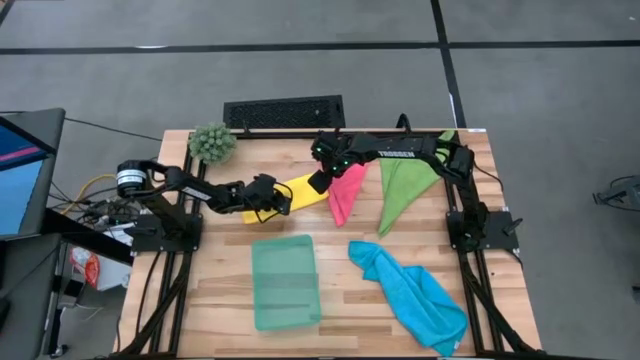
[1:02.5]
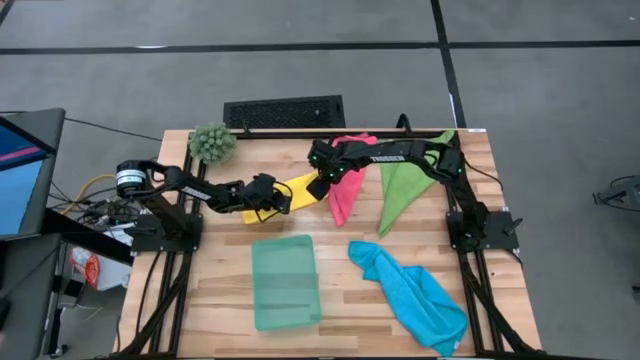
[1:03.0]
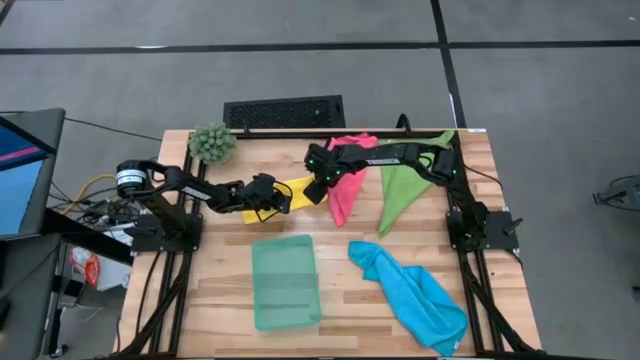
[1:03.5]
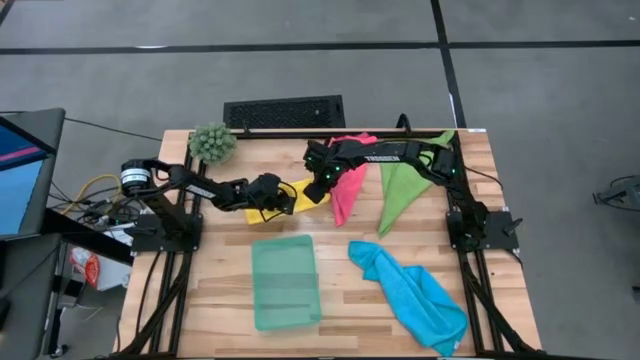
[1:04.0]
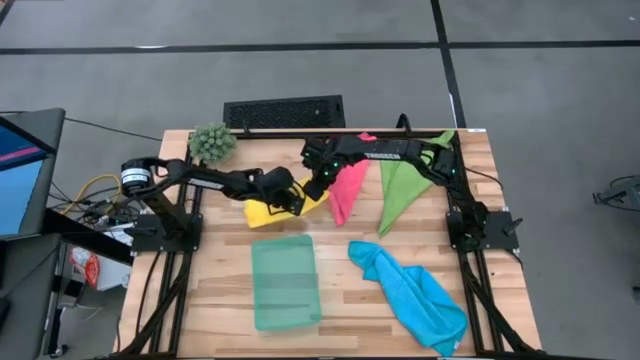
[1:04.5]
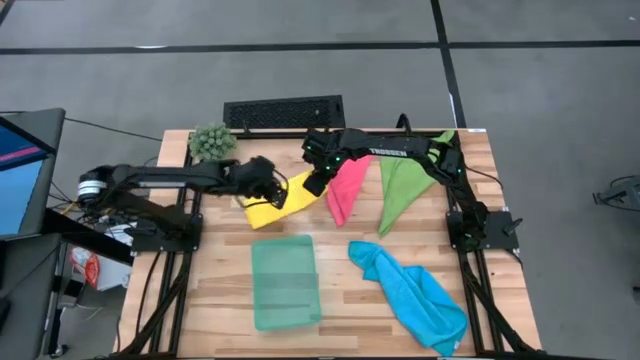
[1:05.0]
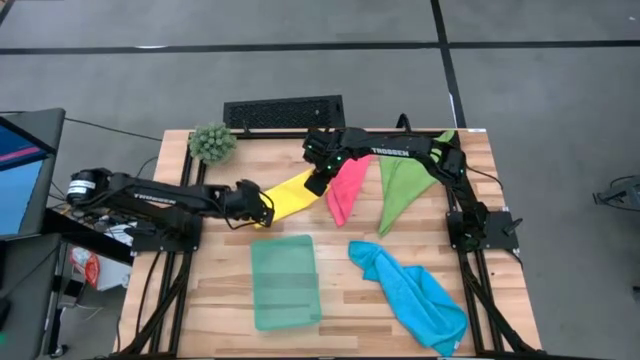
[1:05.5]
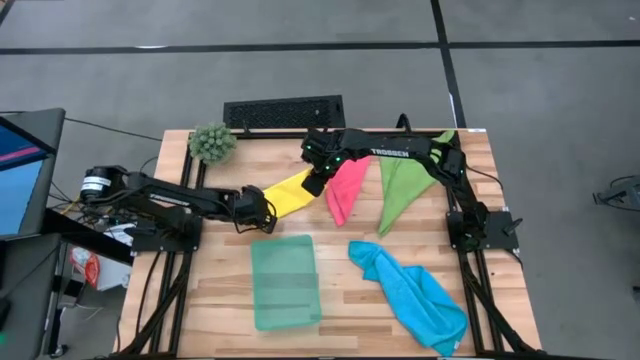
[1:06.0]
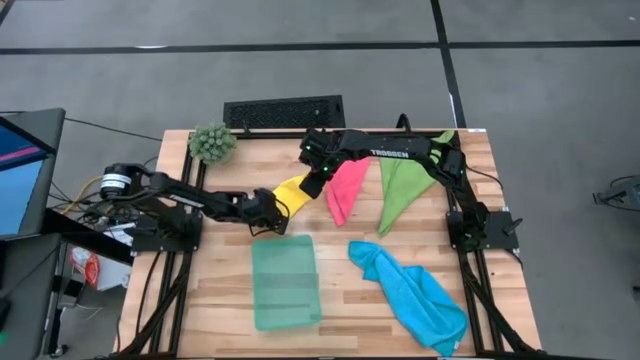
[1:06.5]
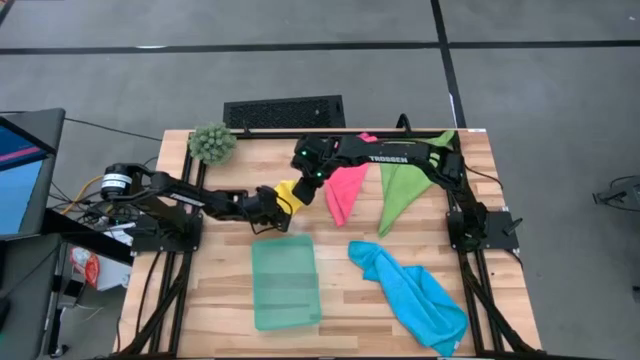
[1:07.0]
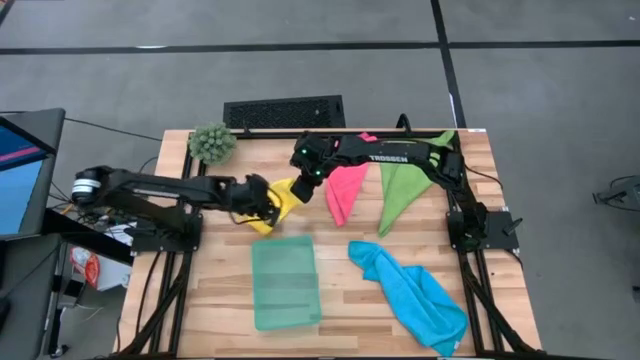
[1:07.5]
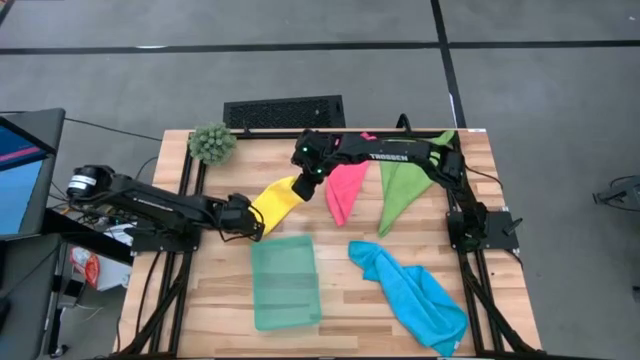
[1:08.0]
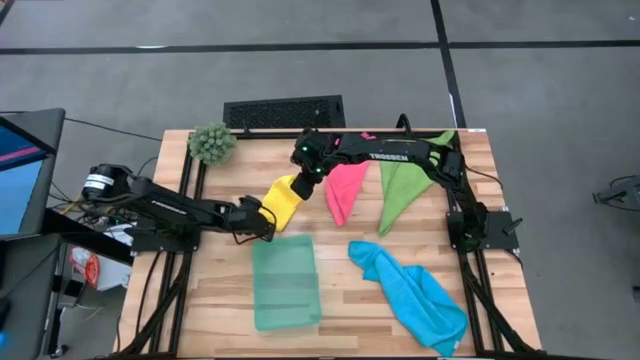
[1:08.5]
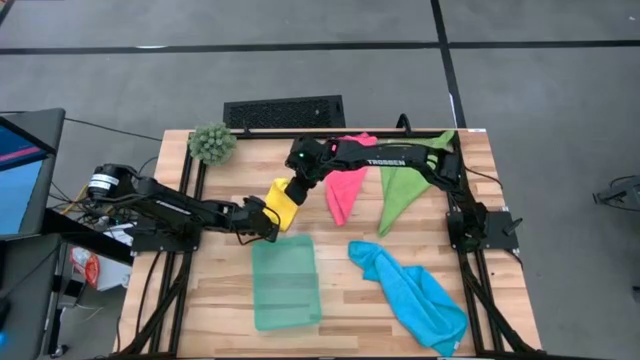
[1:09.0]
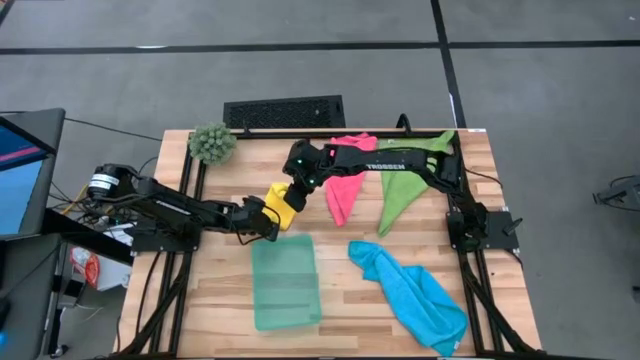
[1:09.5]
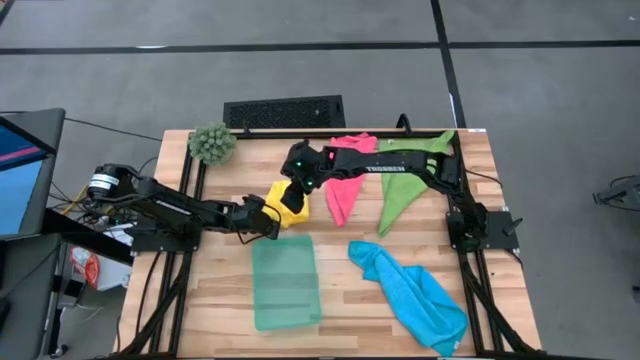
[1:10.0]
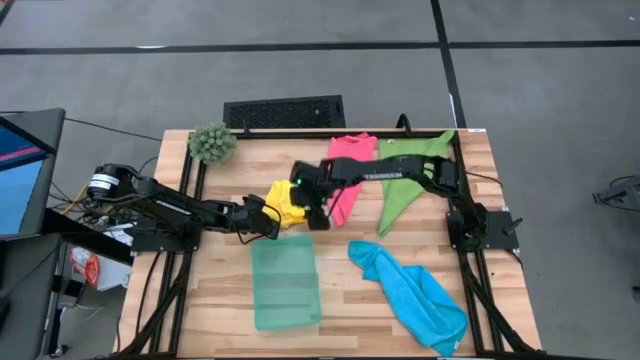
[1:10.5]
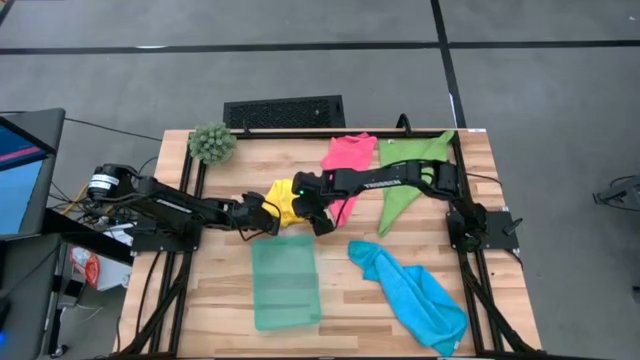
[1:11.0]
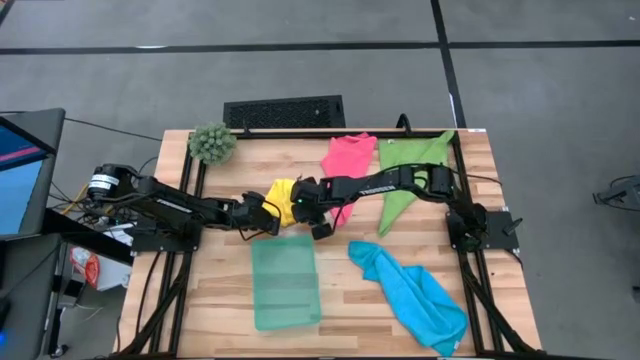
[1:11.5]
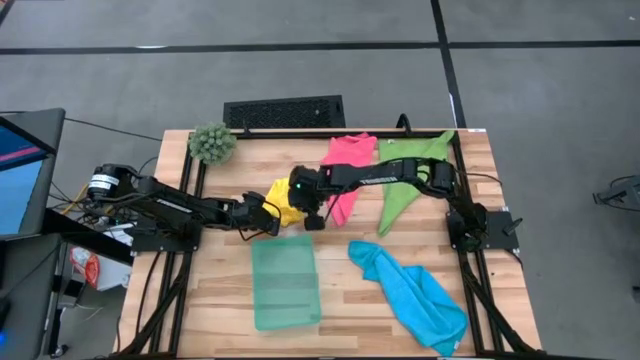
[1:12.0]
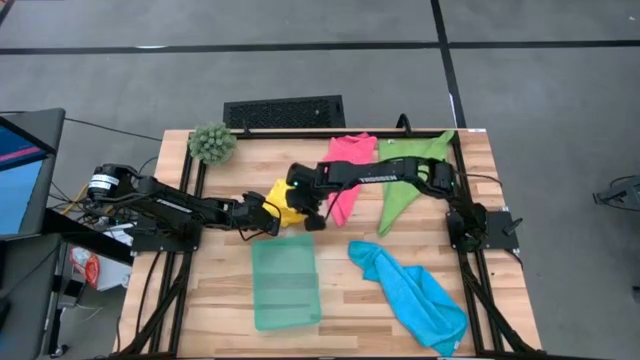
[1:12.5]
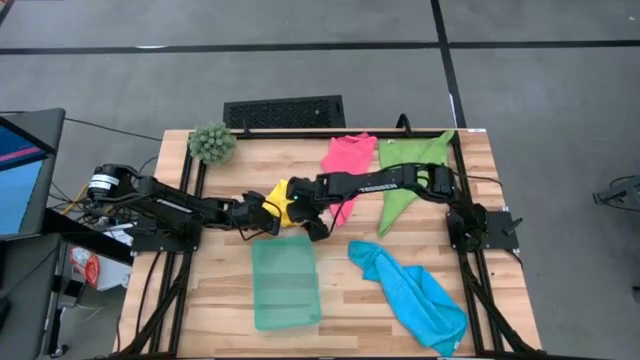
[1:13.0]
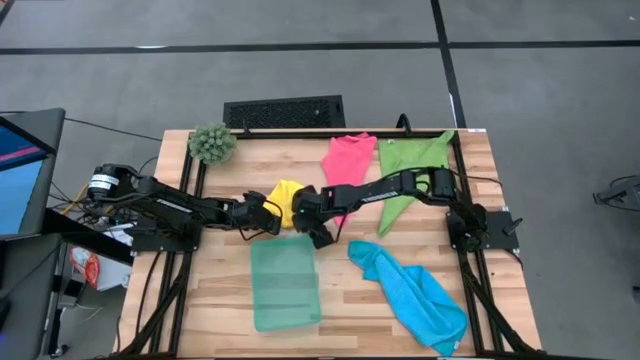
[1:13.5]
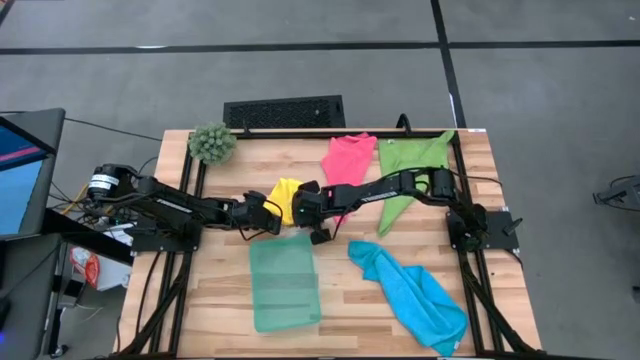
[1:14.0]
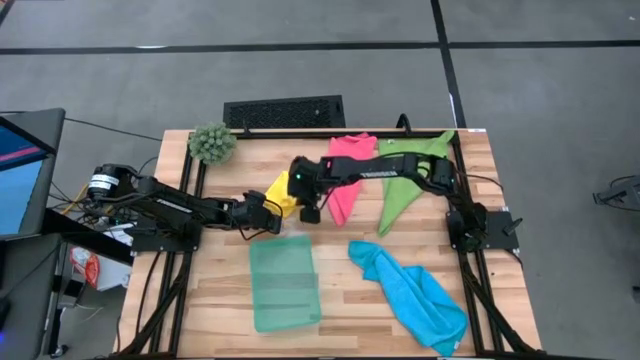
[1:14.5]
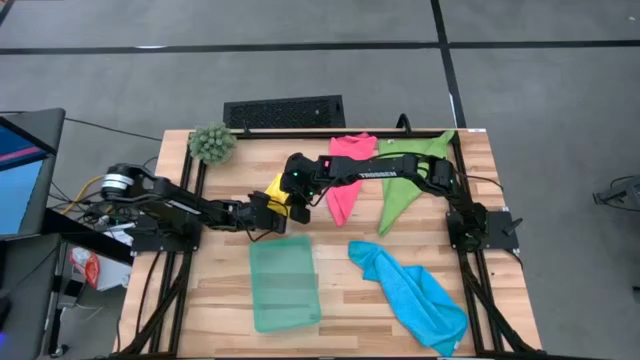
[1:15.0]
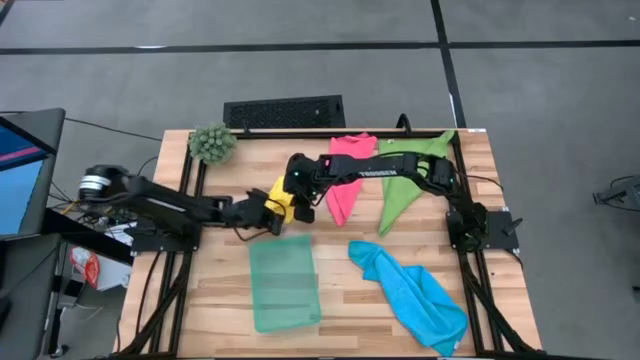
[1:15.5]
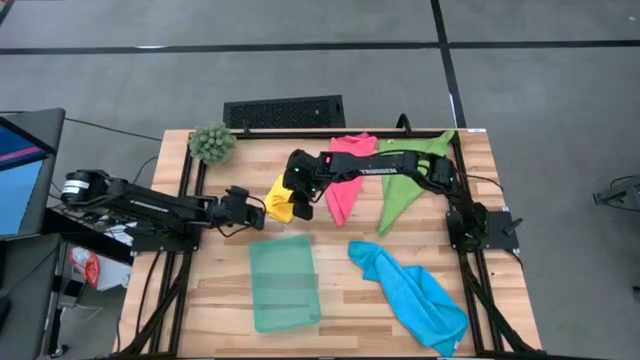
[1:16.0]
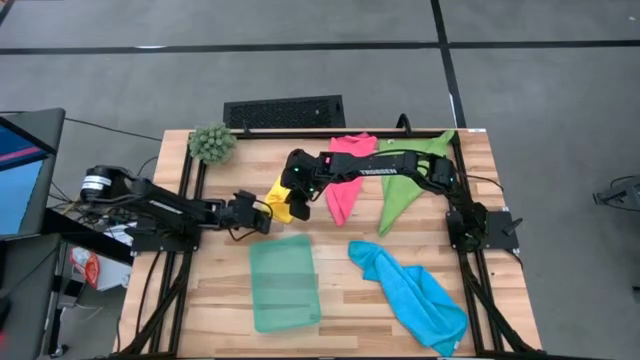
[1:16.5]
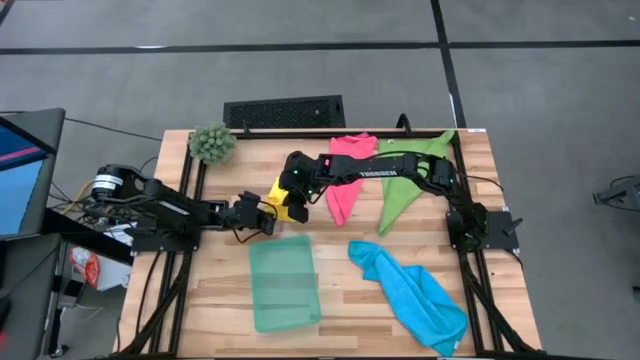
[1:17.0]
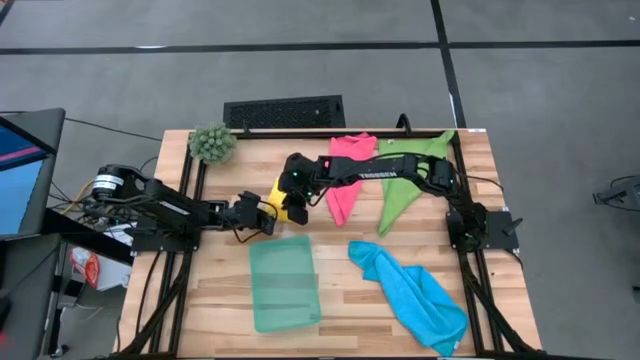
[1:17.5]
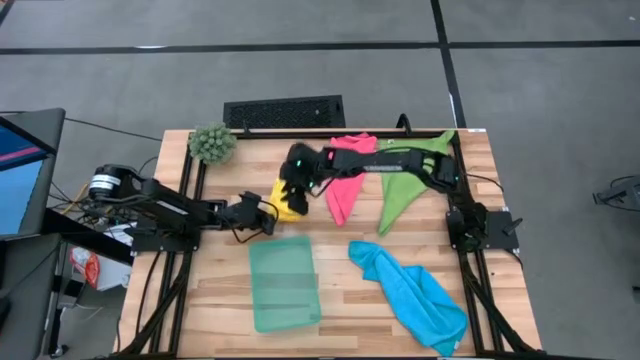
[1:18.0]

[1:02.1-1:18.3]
Task: Fold microfiber towels
Fold the yellow towel

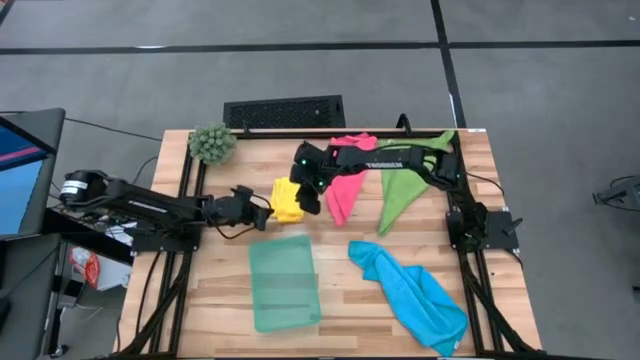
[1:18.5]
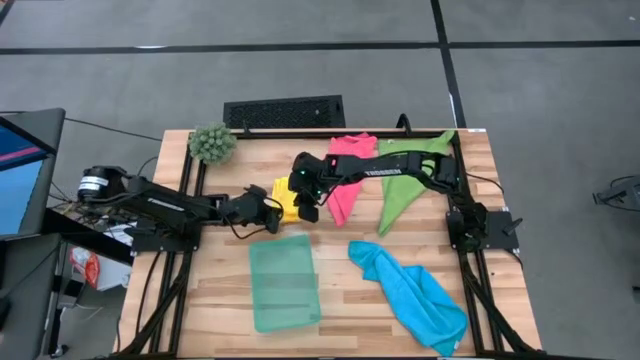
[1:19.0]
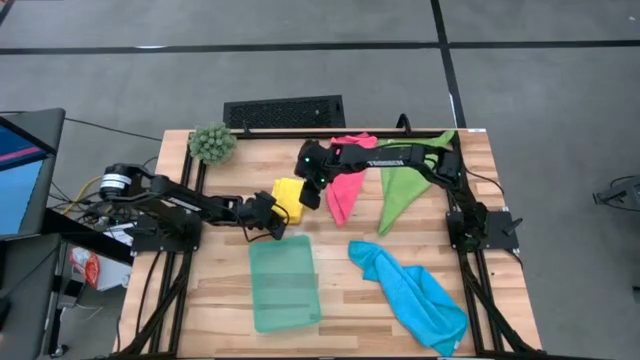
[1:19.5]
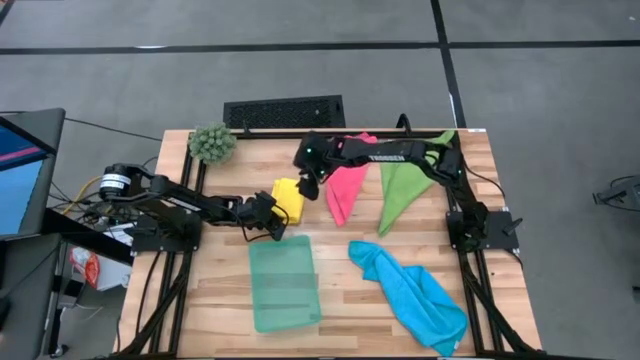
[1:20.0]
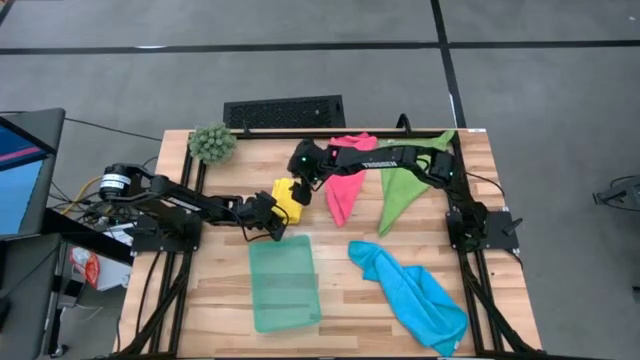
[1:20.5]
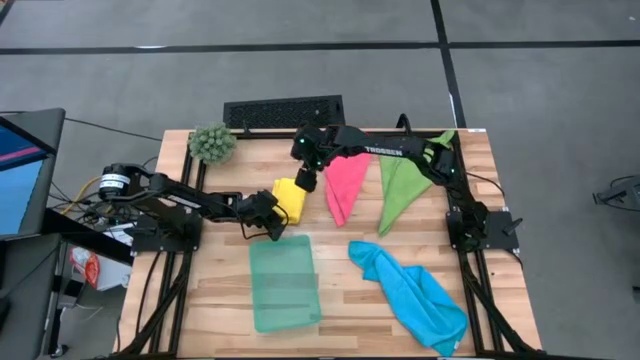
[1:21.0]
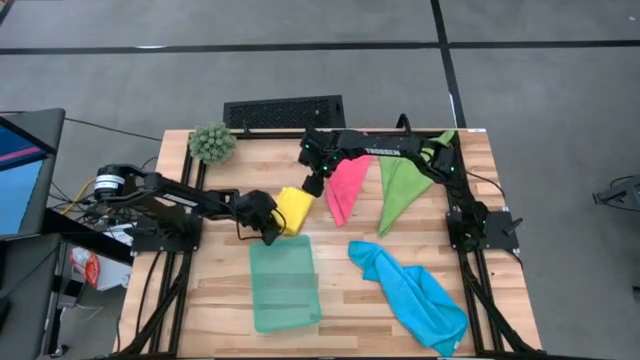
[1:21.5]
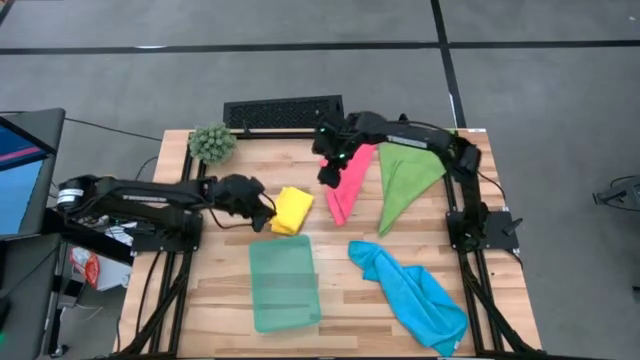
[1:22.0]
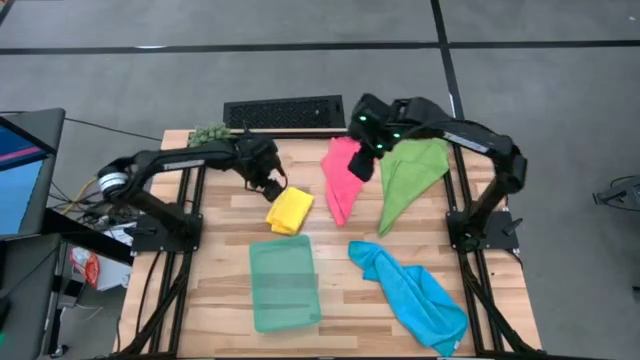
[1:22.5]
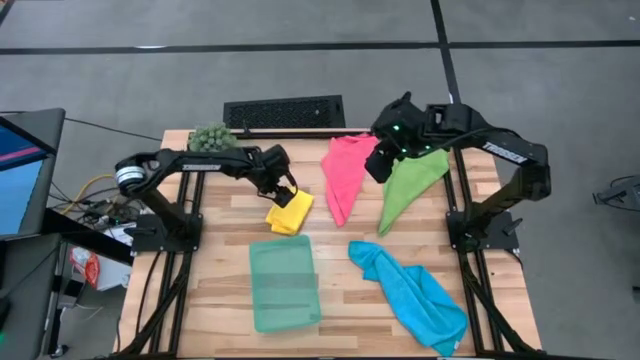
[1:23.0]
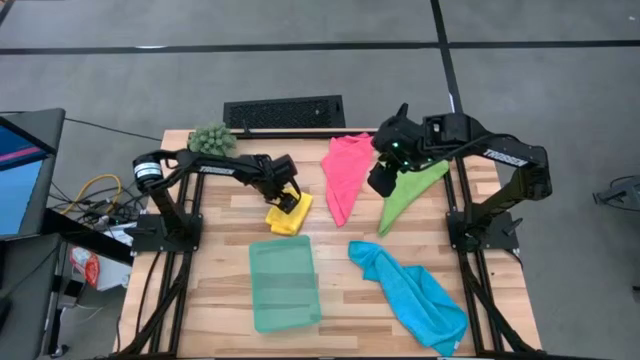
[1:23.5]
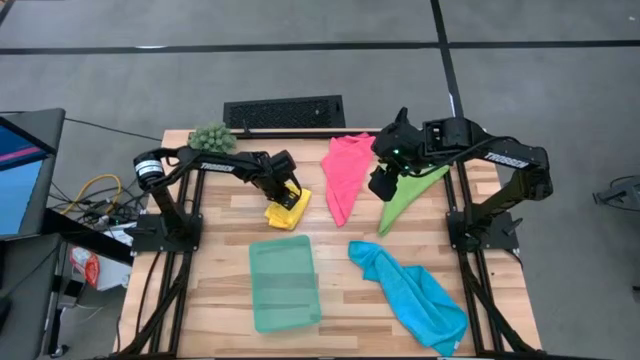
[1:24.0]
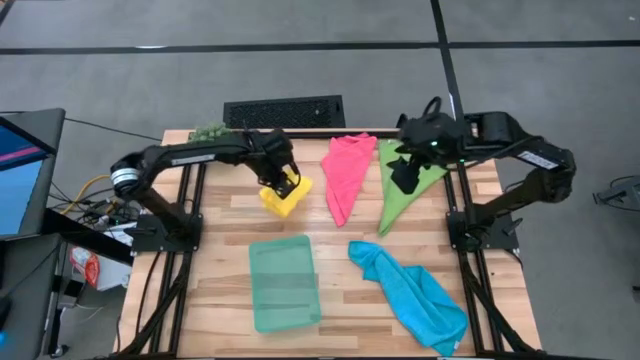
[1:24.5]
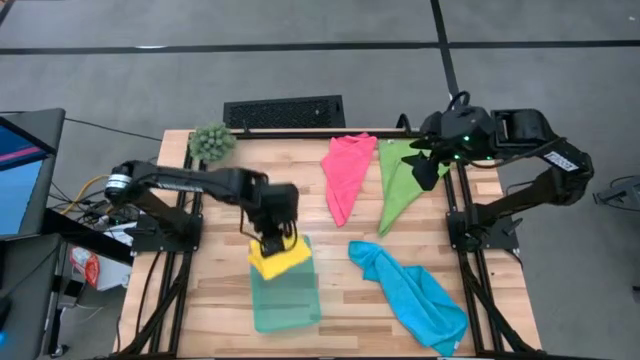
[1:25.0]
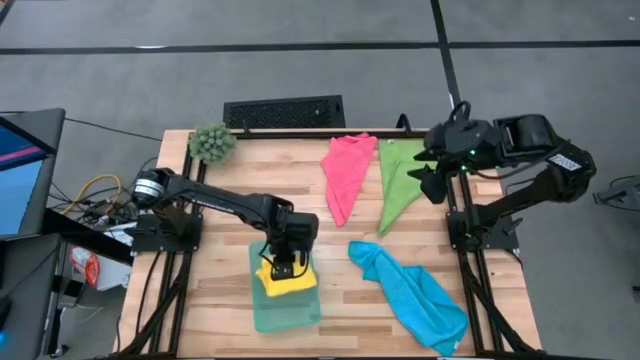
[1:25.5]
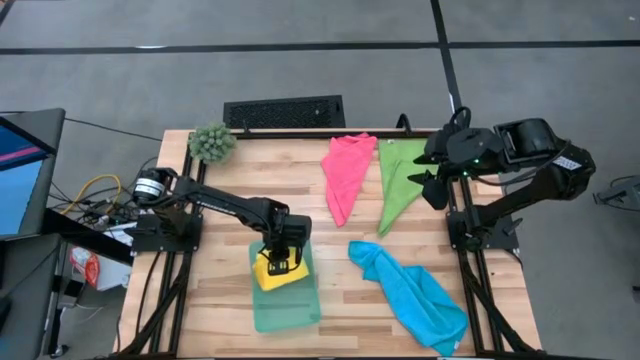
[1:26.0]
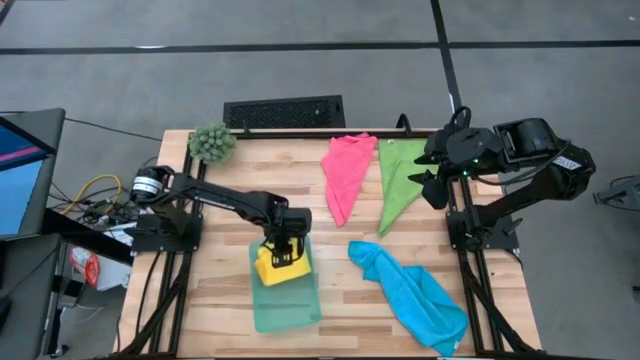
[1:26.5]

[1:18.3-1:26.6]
Put the folded yellow towel in the green bin
